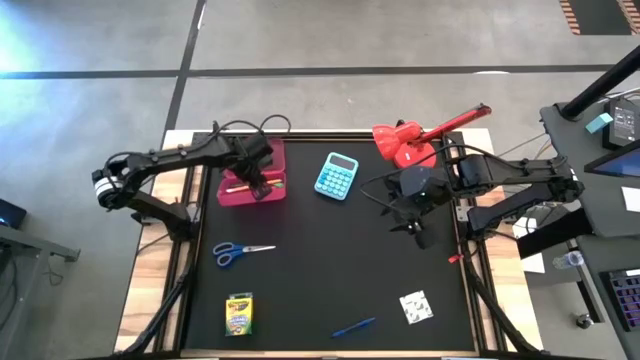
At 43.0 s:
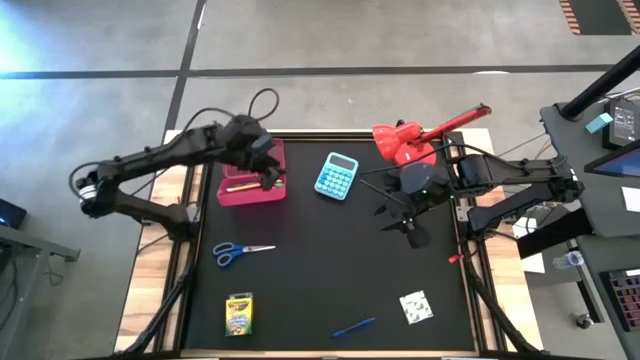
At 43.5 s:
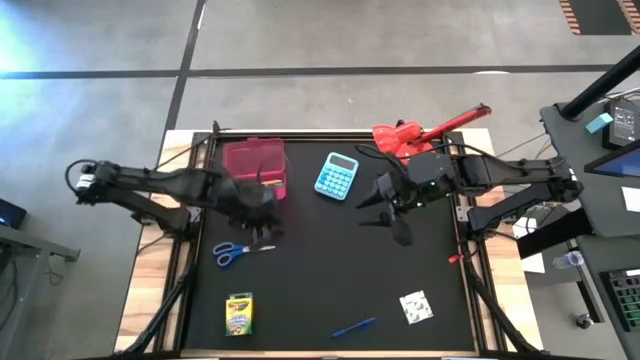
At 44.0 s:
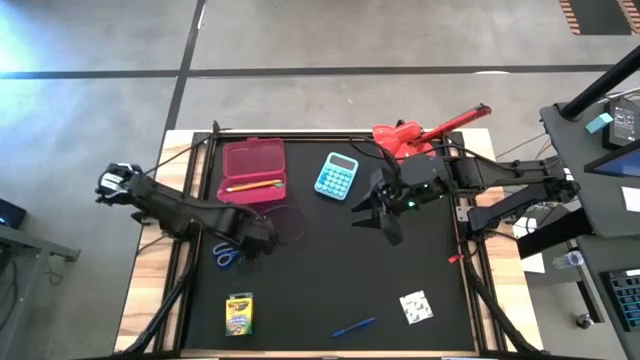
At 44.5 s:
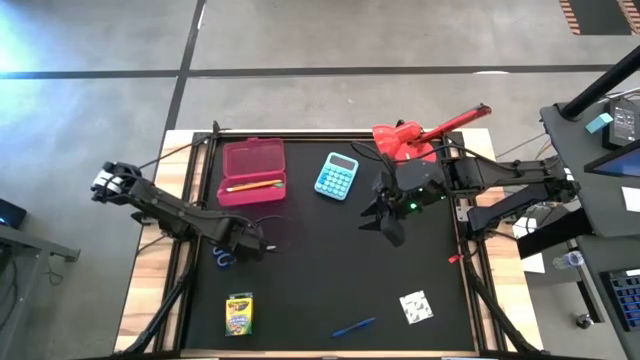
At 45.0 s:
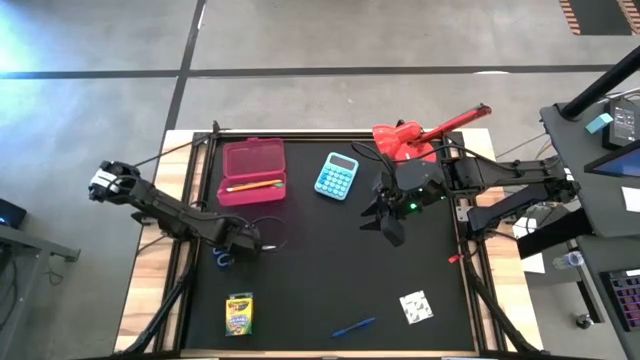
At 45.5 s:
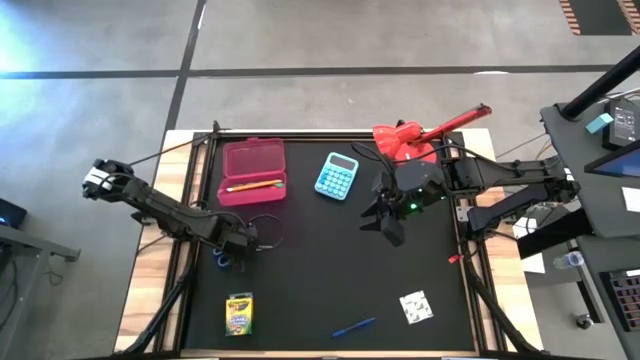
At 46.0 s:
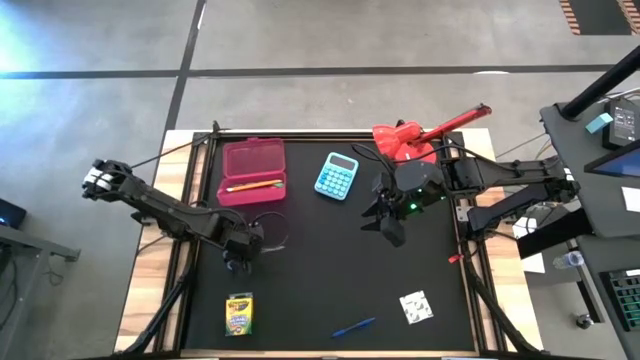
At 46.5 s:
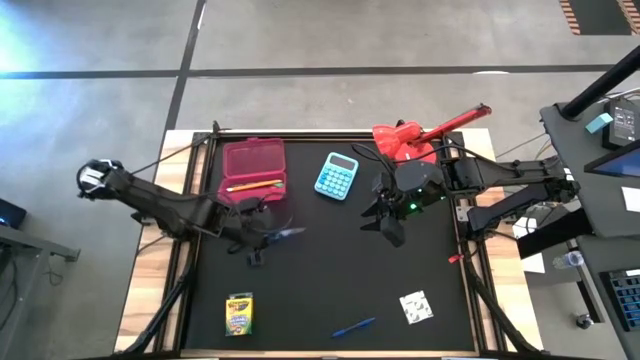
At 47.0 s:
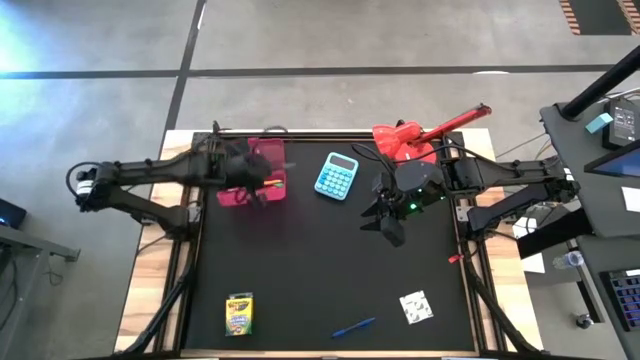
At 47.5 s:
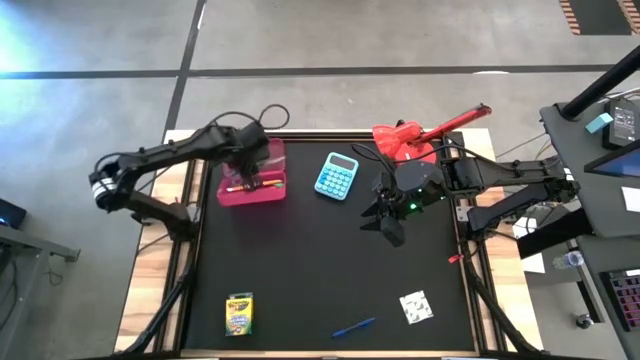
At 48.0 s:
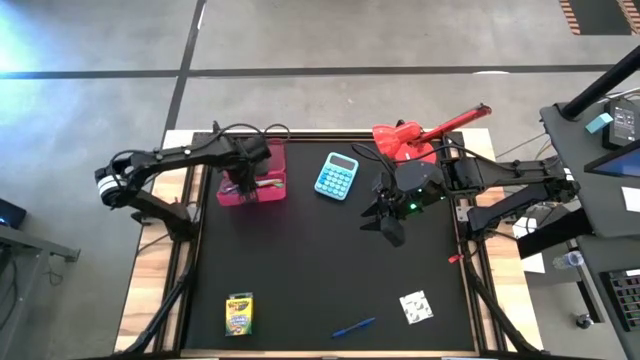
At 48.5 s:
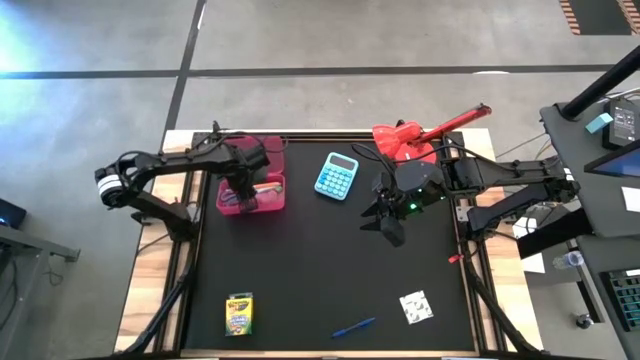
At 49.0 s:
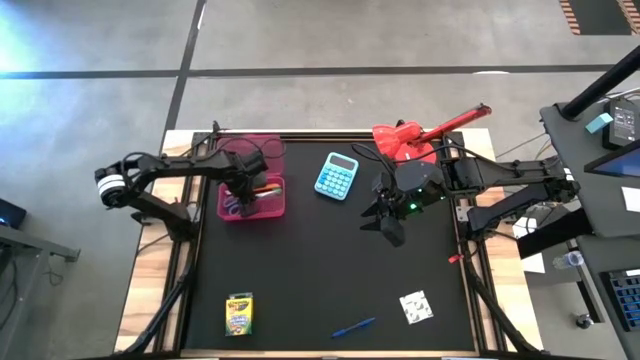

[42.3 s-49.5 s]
Task: Pack school essentials
Put the blue scissors into the red supply box

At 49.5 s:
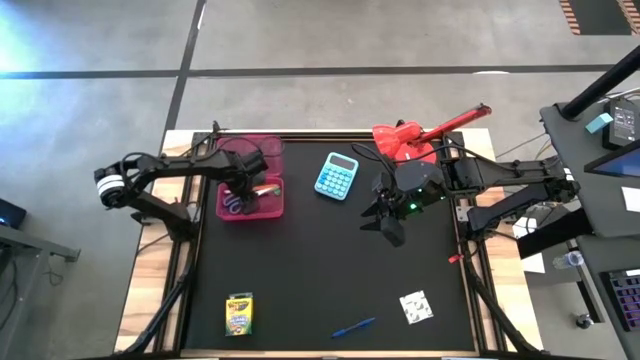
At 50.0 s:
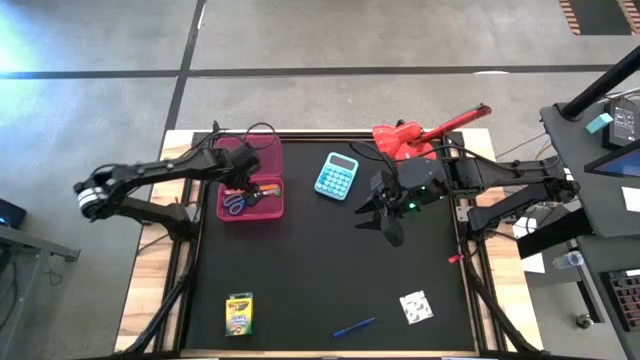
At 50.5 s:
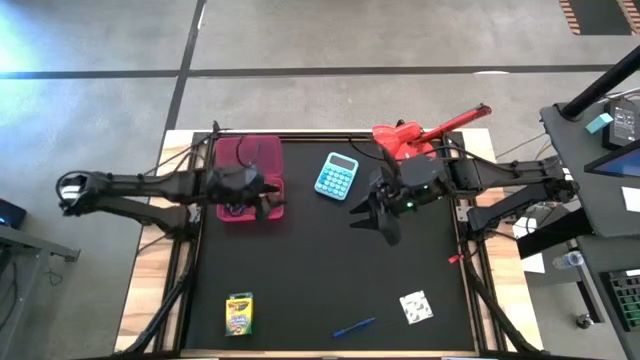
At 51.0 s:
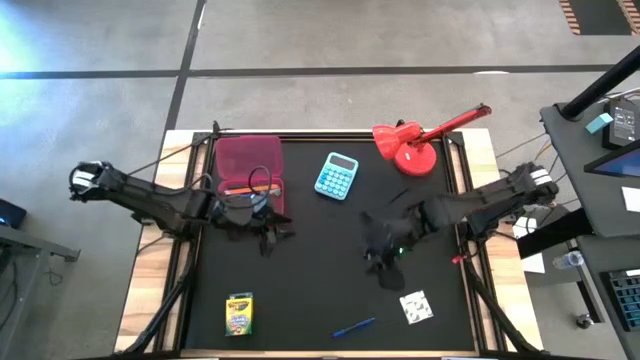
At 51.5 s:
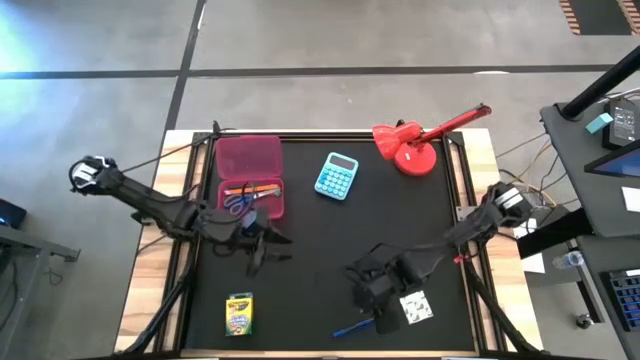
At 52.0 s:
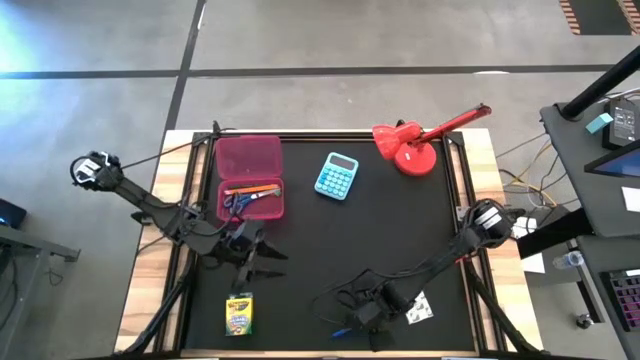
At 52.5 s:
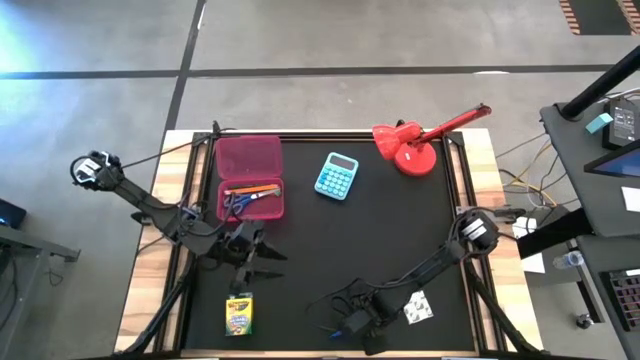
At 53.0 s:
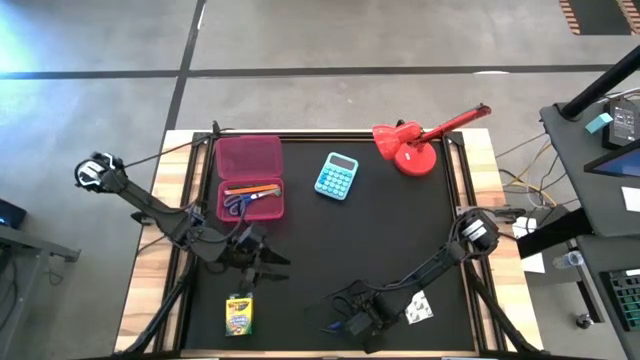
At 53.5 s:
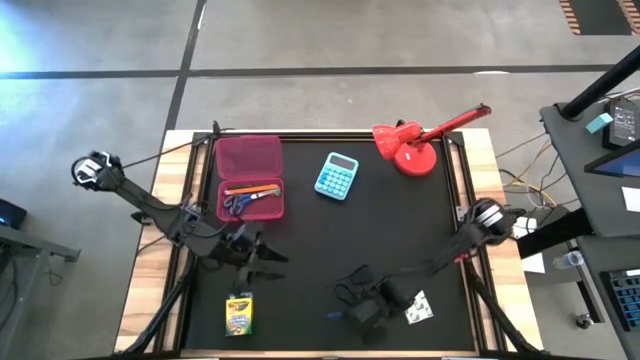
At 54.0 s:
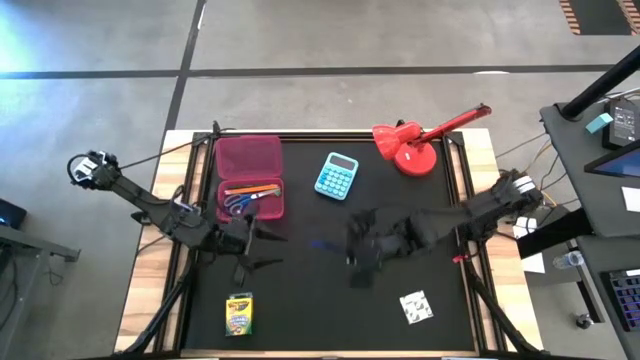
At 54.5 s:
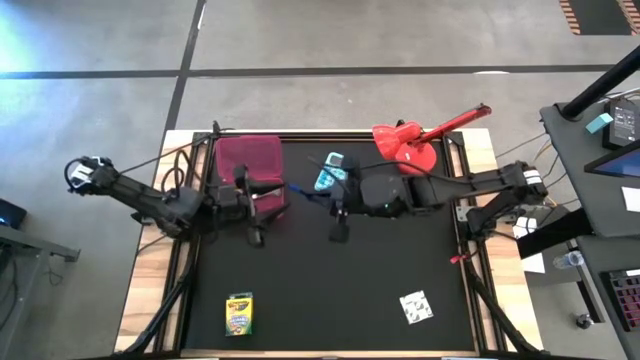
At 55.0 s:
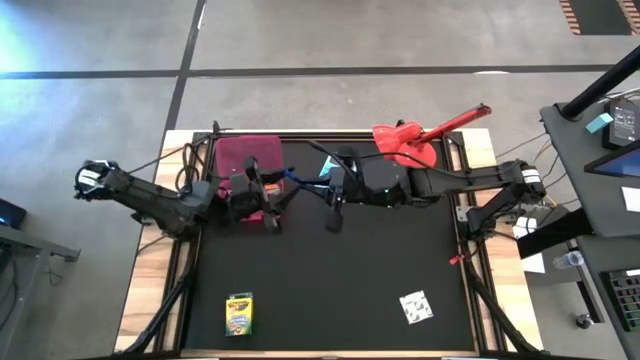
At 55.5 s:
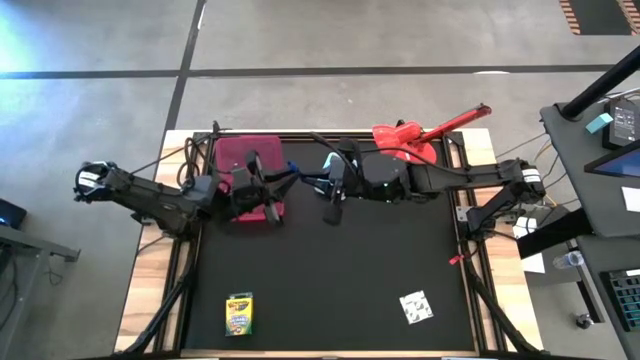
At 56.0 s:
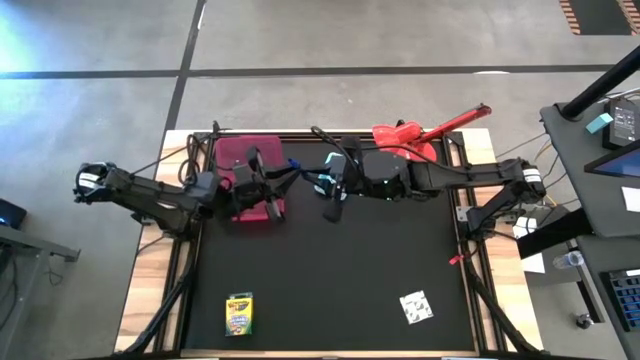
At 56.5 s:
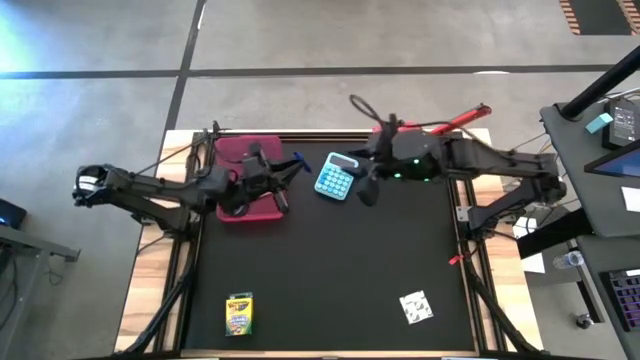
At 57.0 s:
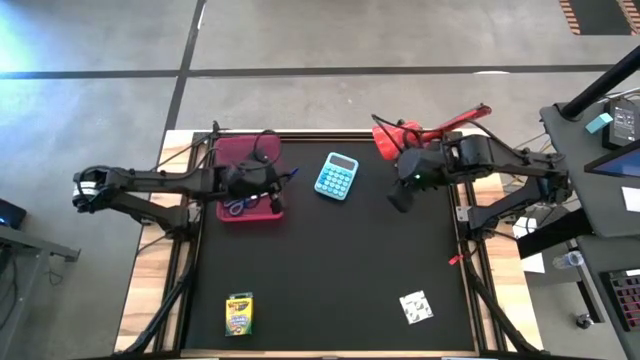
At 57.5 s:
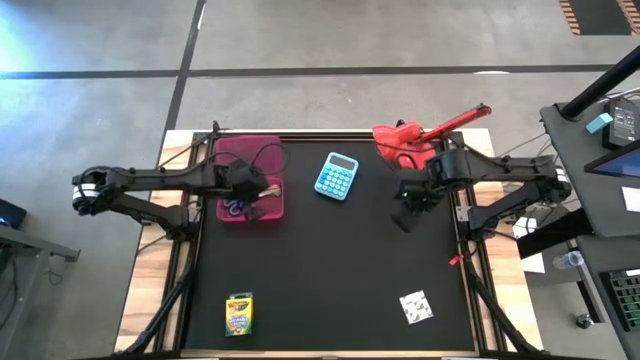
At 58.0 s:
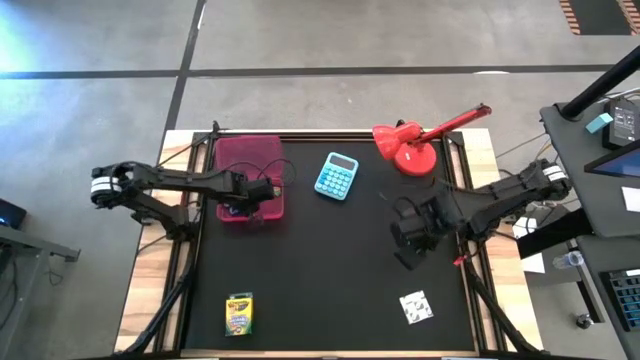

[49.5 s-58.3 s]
Put the blue pen into the red supply box

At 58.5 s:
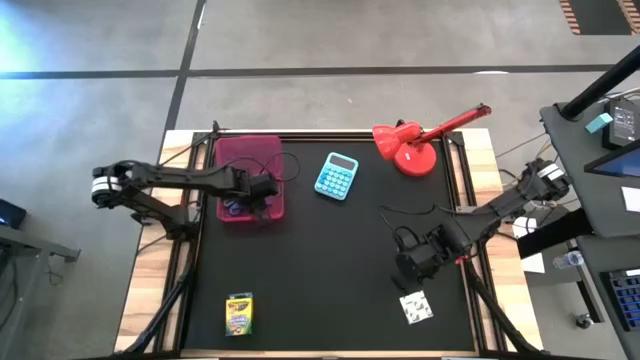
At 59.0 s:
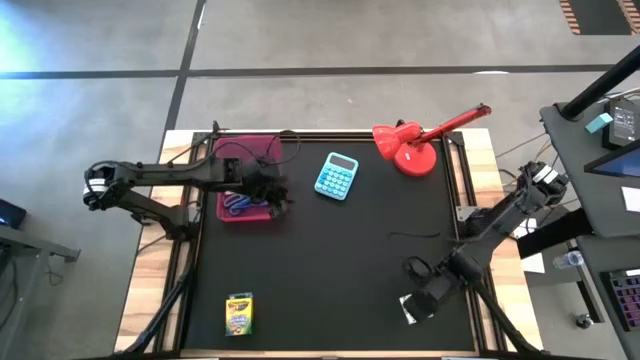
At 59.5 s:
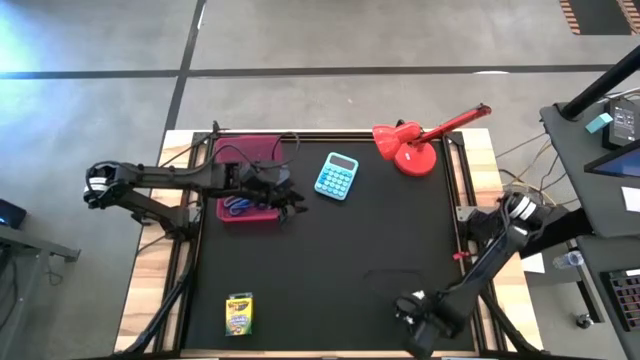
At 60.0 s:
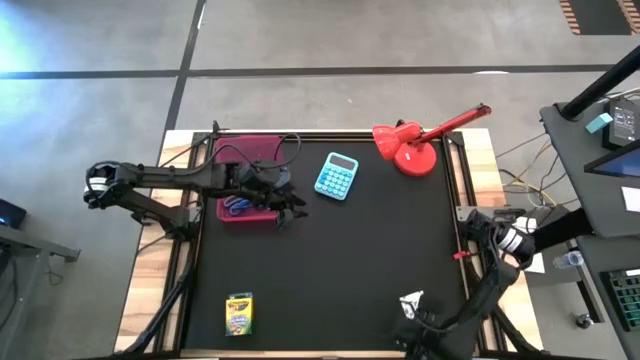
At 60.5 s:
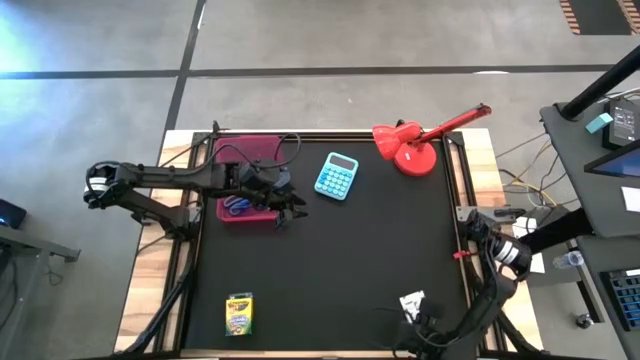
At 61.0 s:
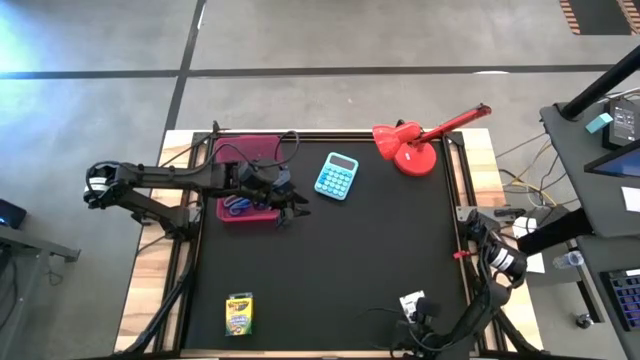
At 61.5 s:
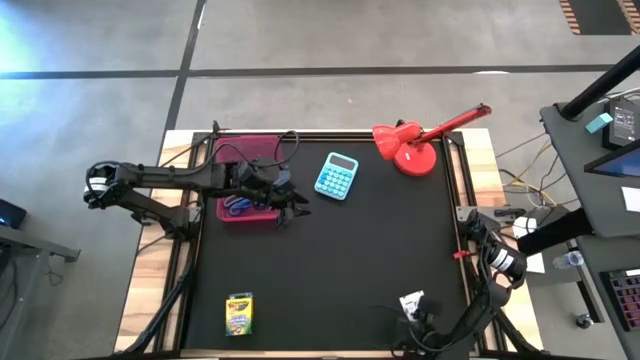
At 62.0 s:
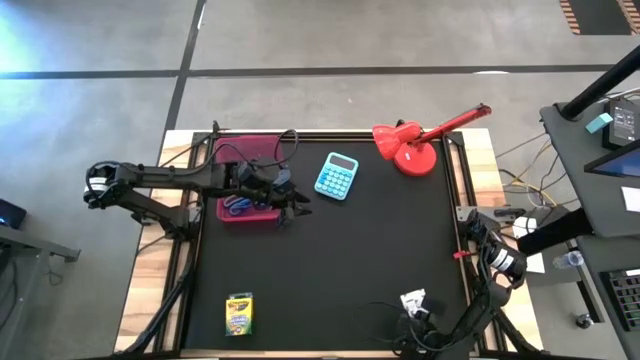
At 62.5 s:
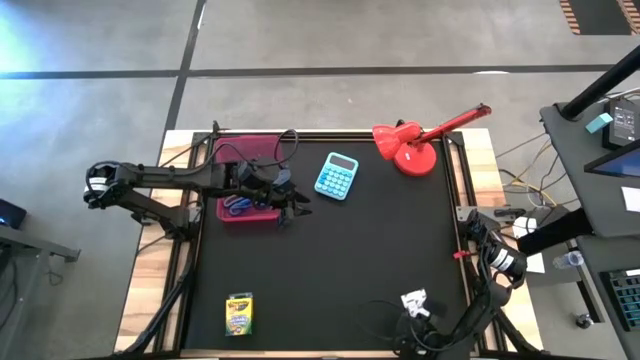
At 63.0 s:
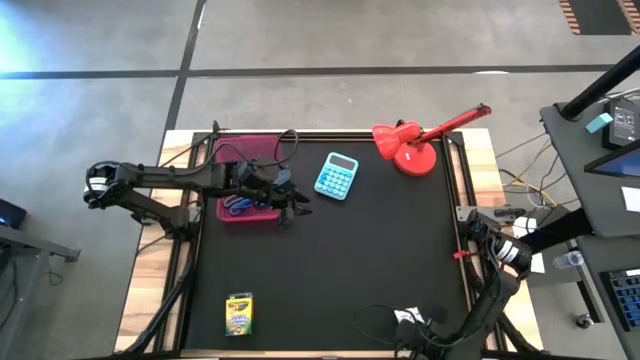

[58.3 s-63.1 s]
Put the violet sticky notes into the red supply box
